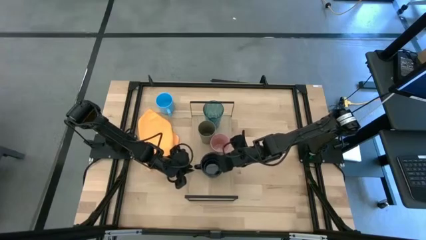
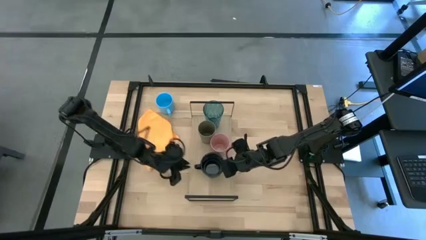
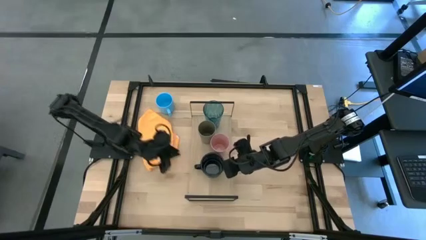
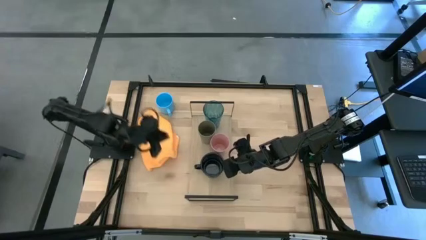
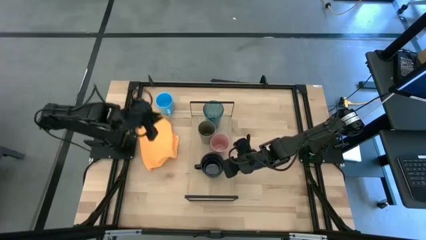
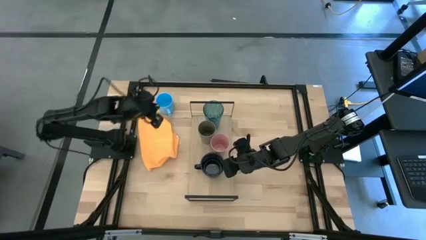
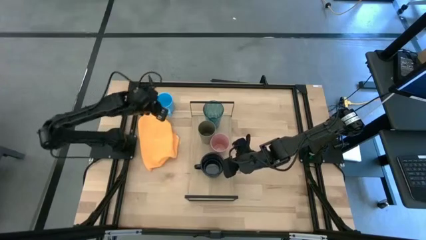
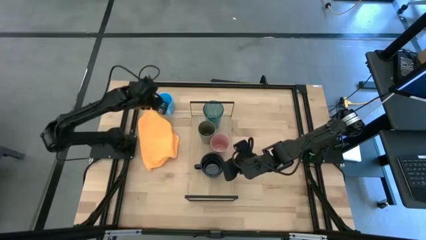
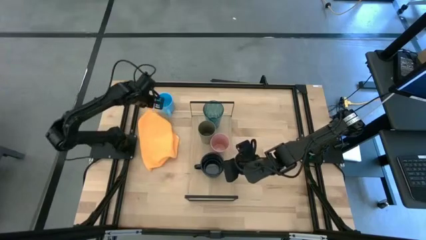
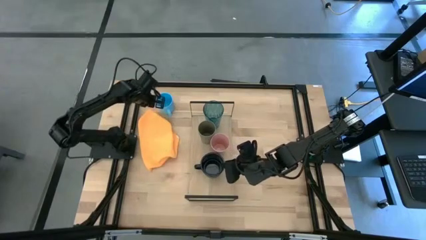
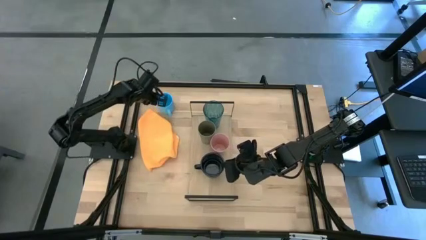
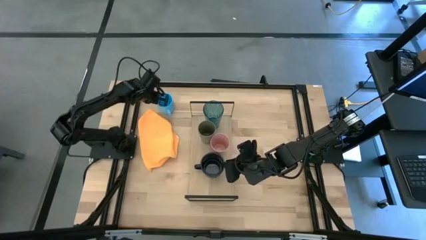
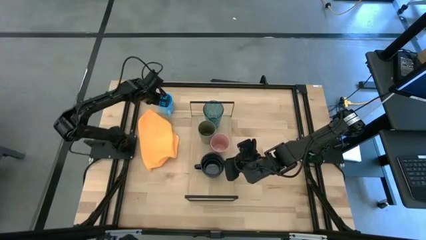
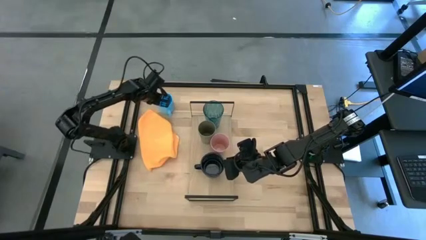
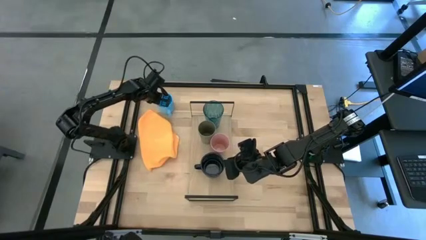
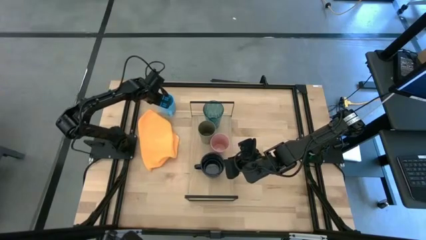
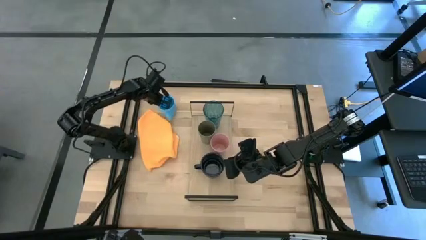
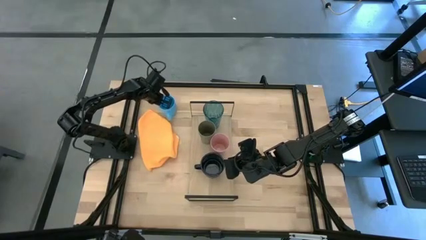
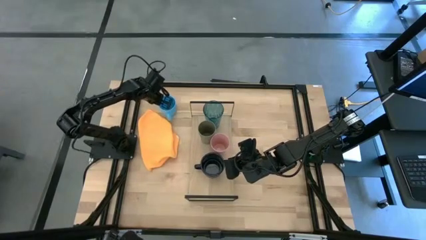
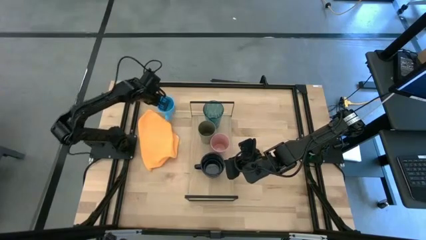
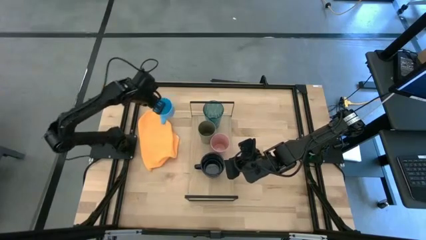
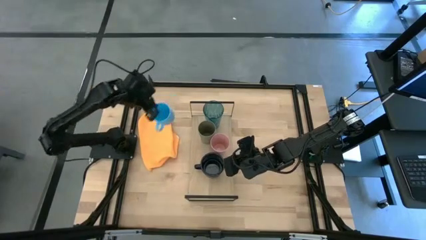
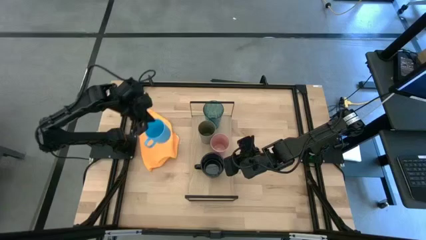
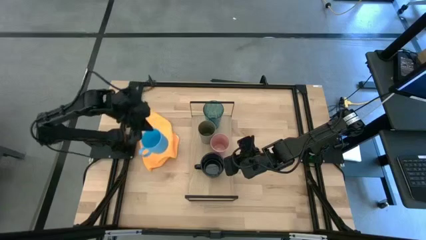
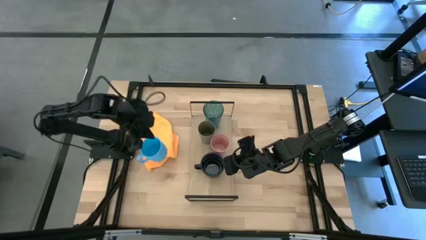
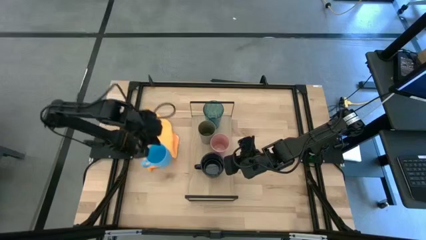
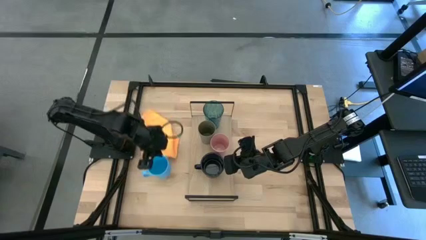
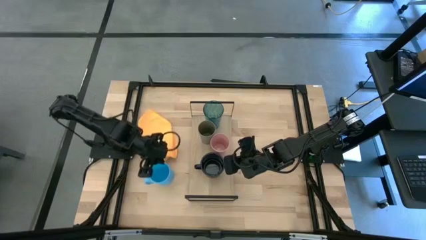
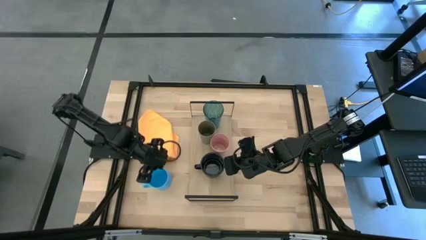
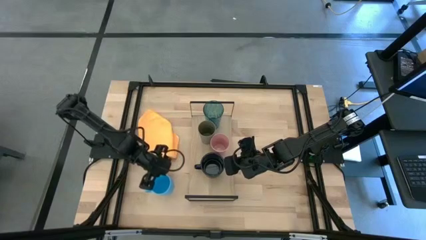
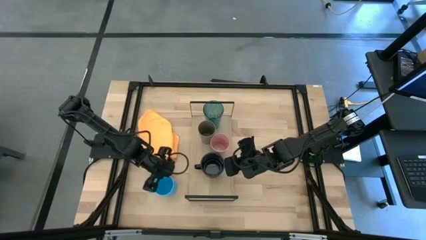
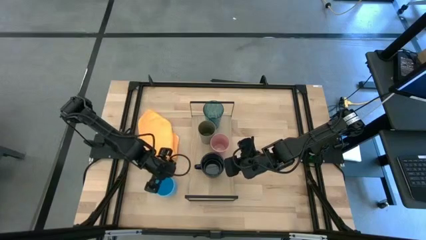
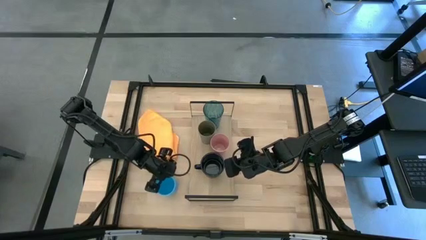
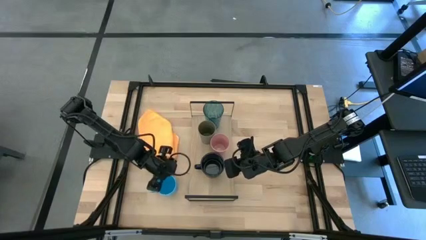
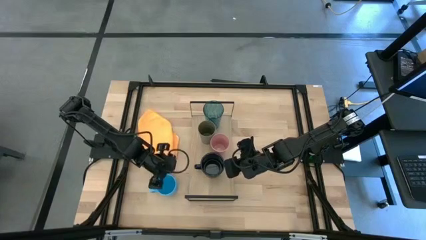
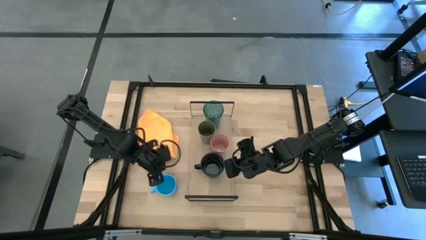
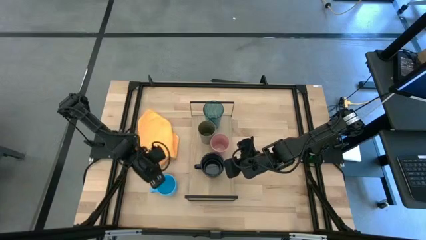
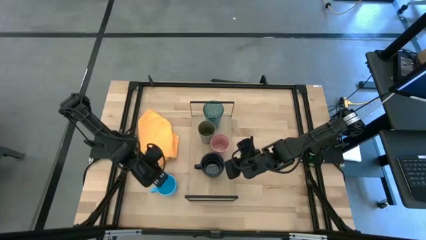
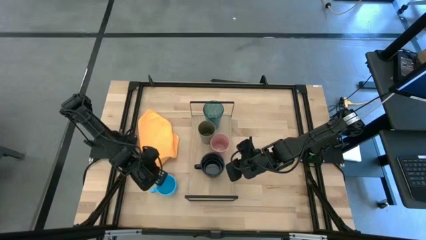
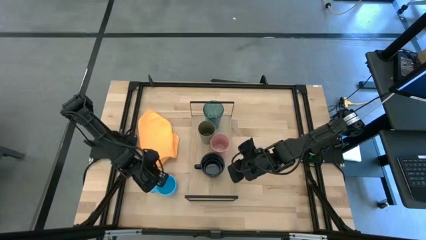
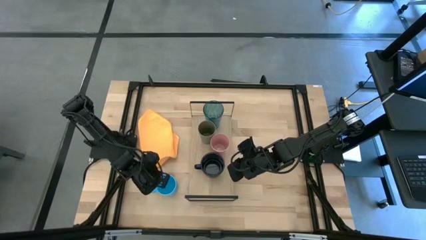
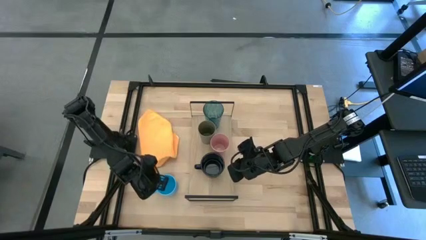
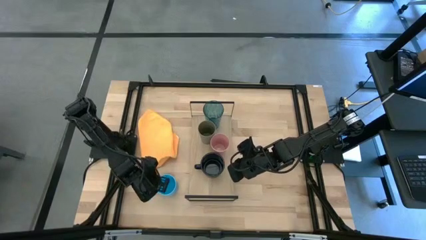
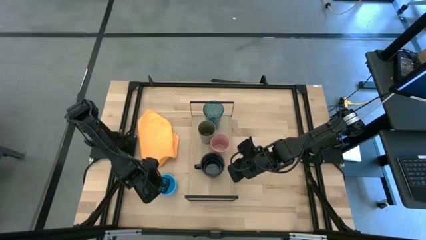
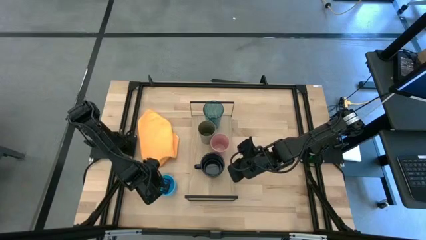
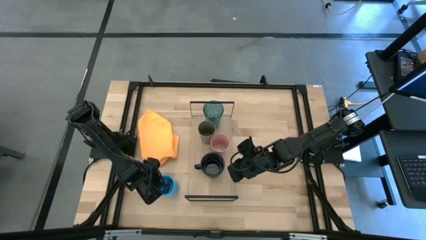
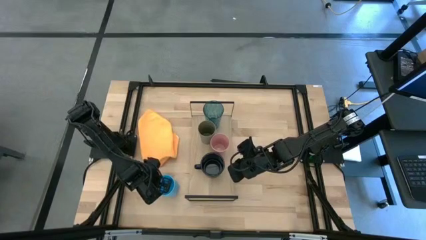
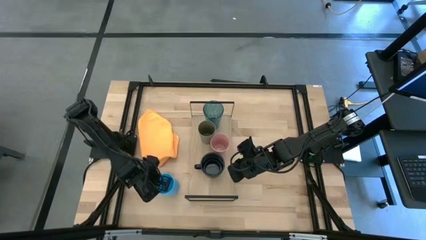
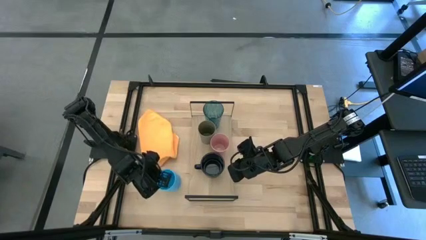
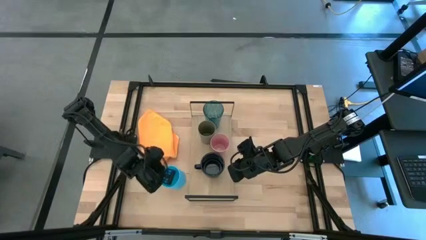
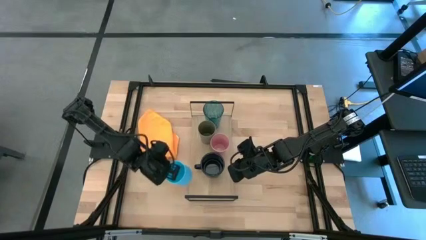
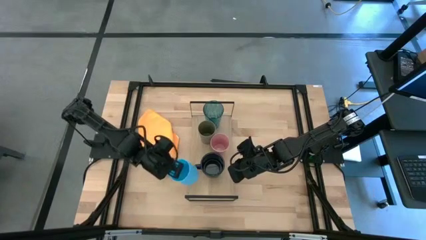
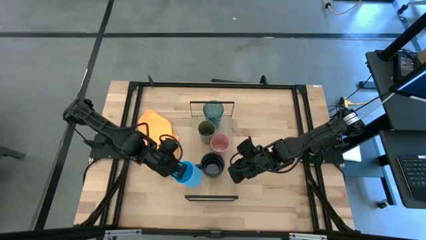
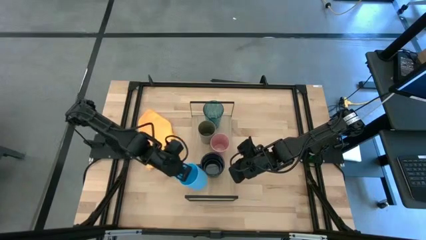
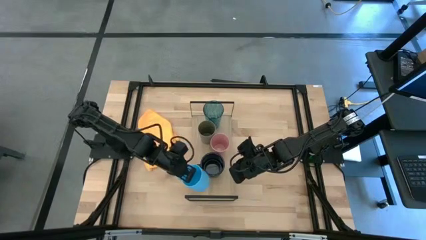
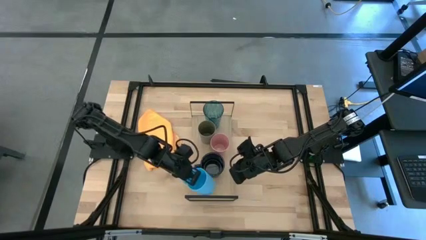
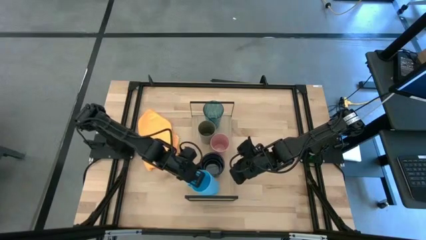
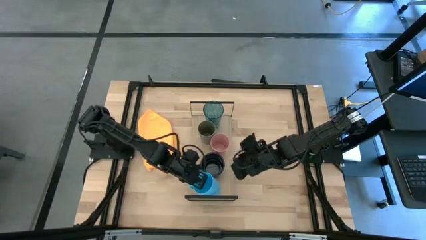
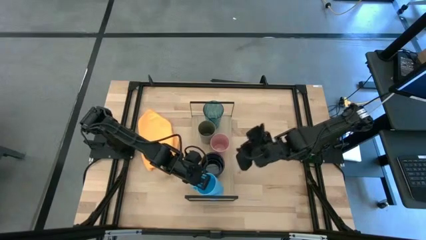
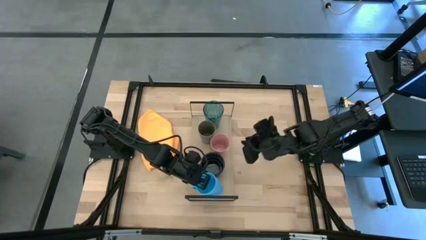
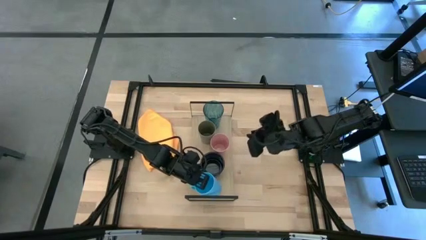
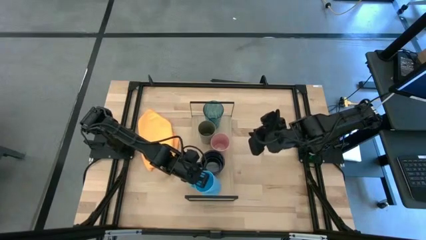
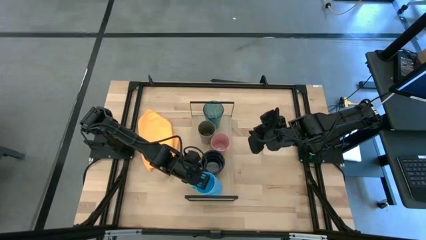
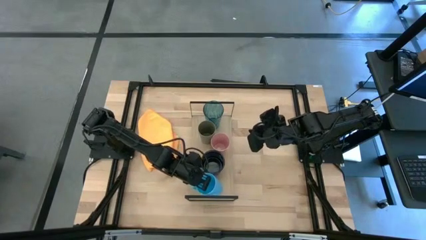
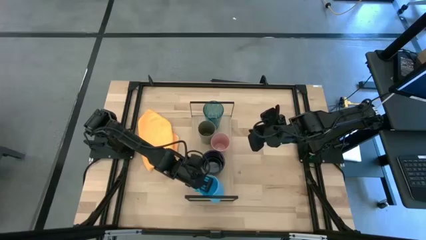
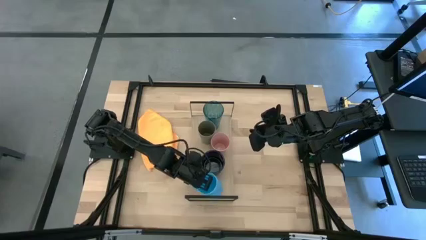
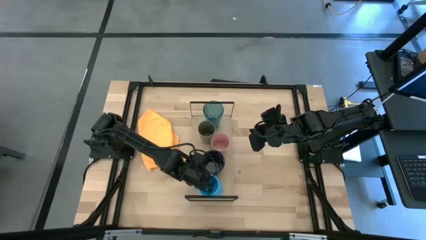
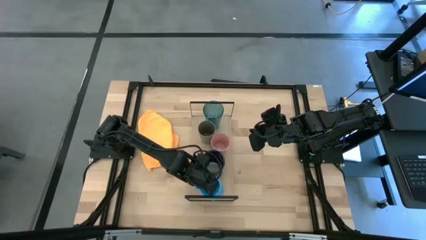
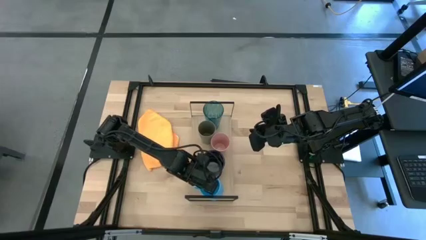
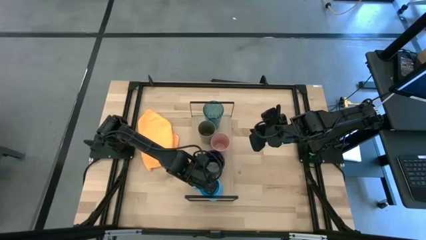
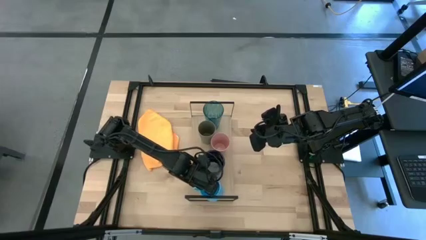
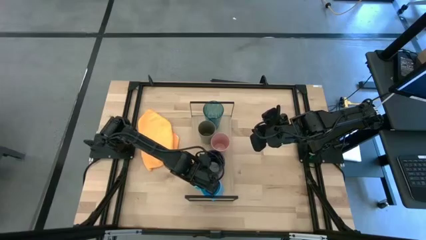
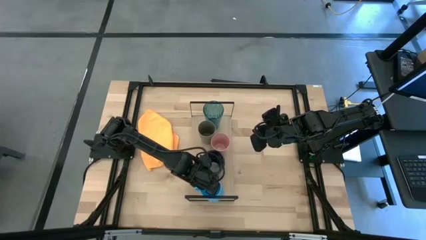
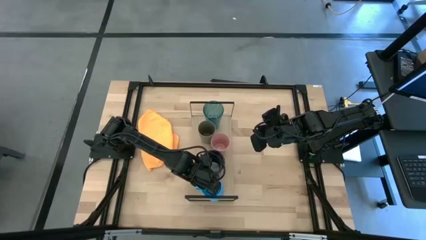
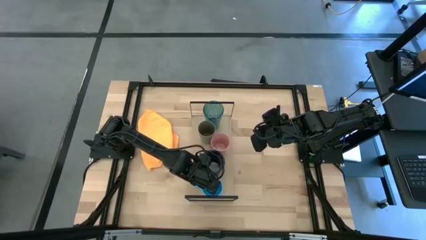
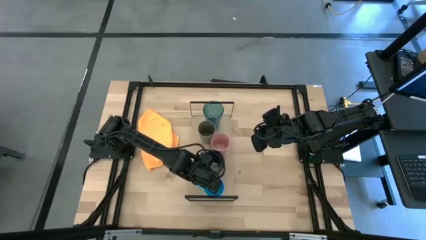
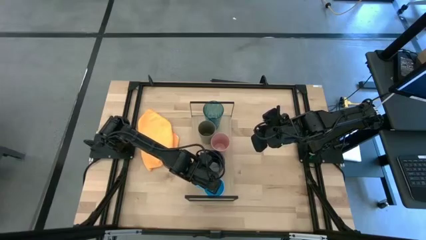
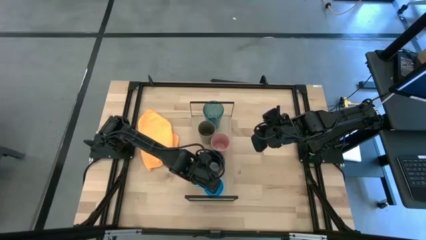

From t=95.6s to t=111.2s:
Task: Stack small to large cups/mugs on shelf
Put the blue mug on the shelf

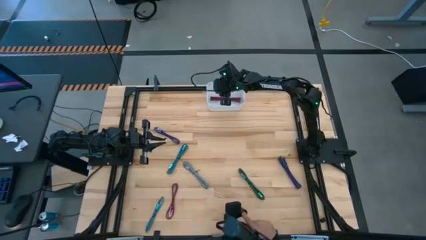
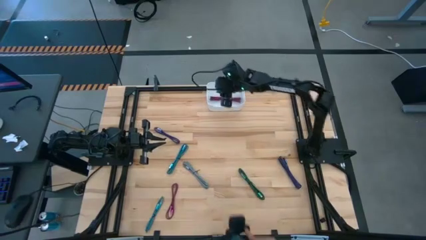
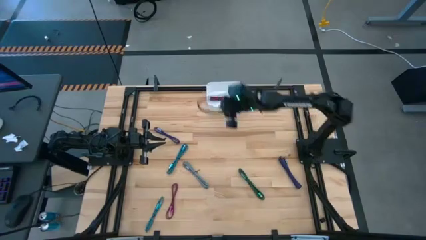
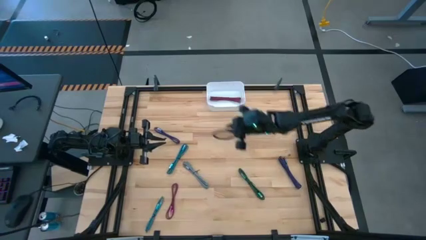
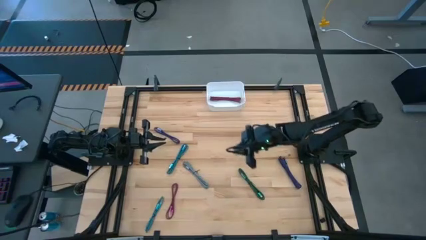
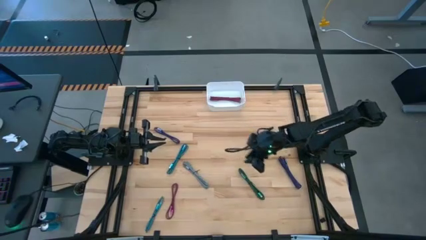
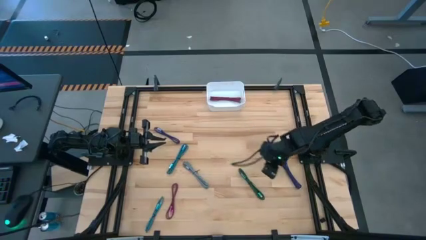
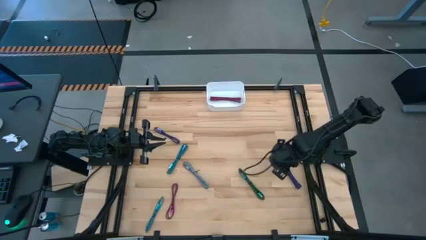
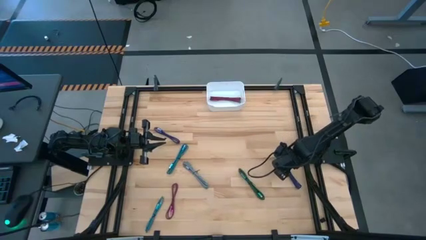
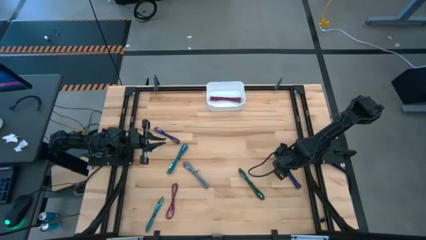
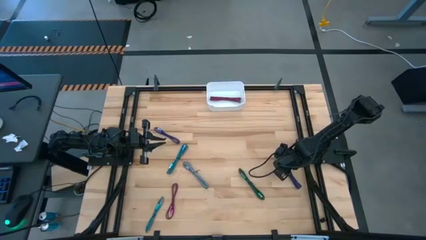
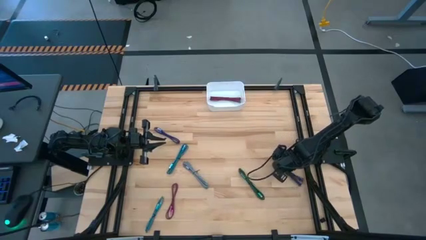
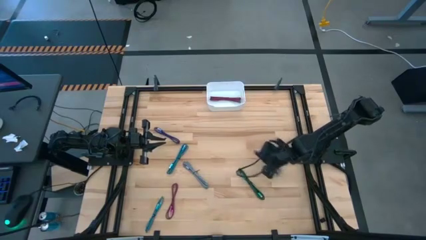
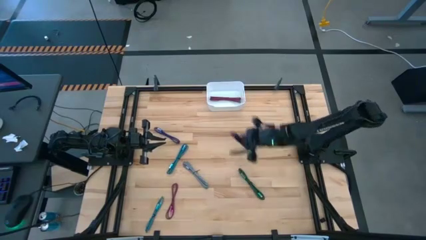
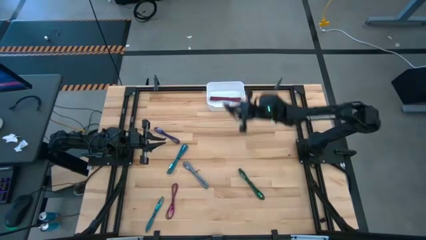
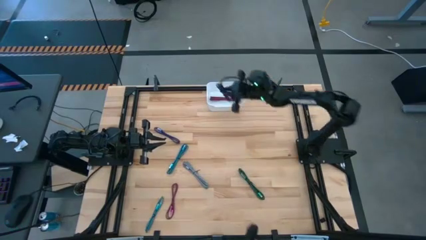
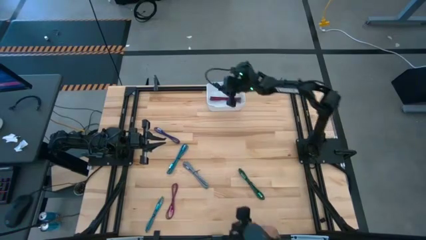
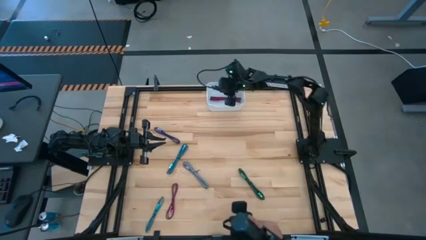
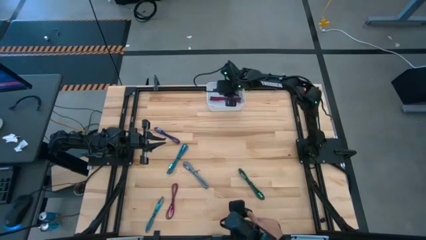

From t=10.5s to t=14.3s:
Task: Pick and place USB-C Cables
Put the right violet charger cable into the white bin
